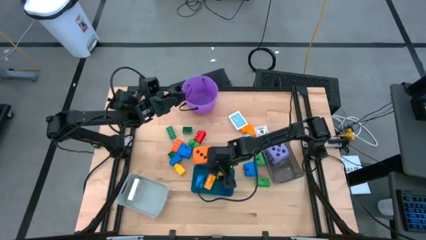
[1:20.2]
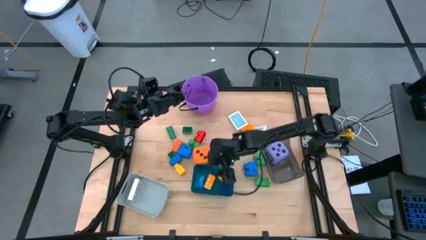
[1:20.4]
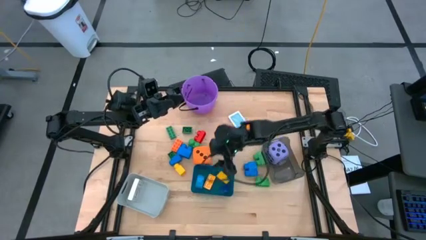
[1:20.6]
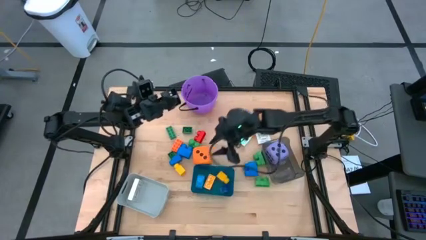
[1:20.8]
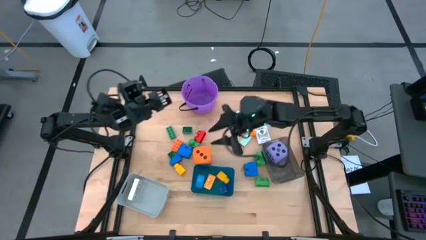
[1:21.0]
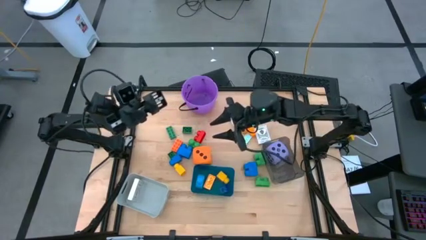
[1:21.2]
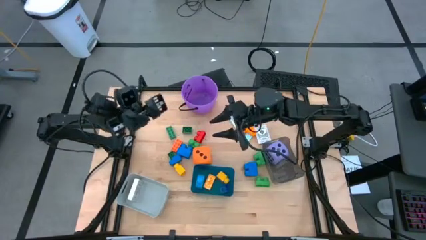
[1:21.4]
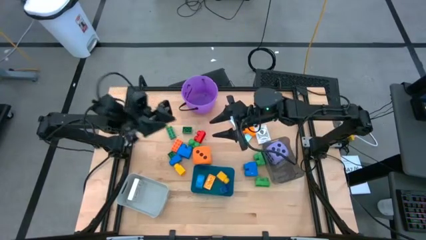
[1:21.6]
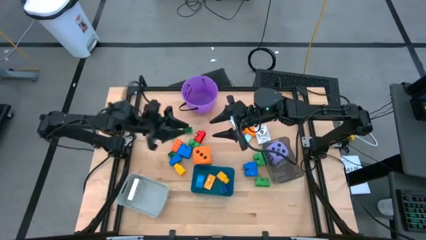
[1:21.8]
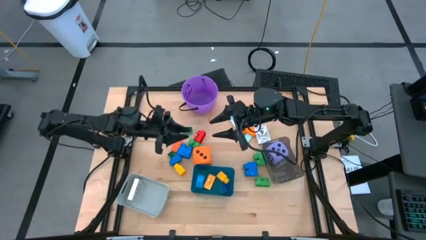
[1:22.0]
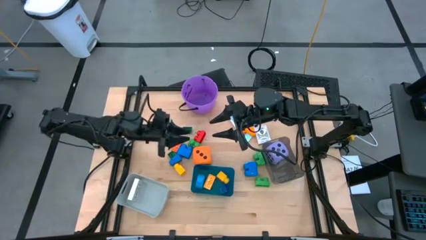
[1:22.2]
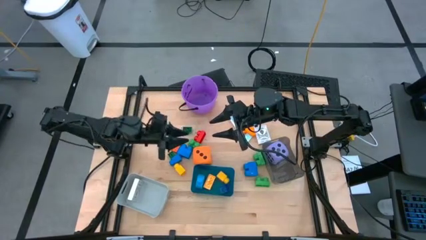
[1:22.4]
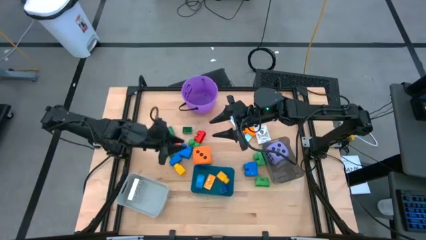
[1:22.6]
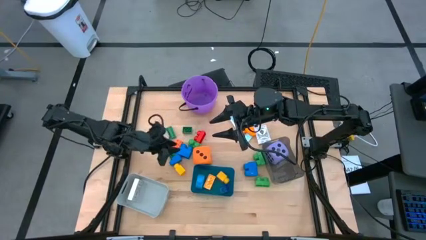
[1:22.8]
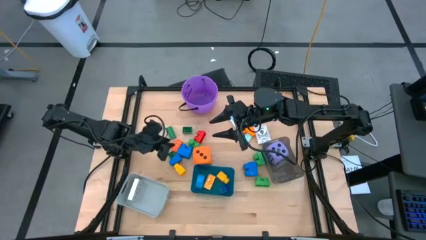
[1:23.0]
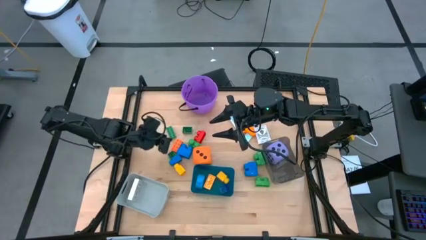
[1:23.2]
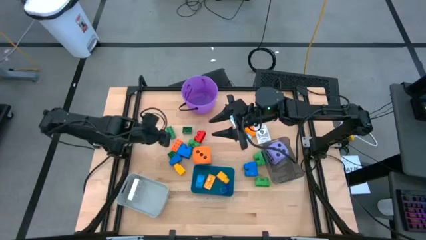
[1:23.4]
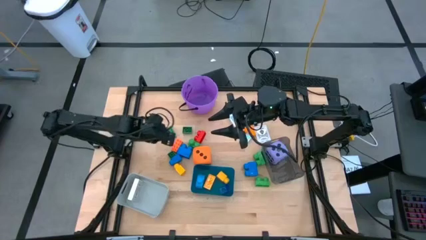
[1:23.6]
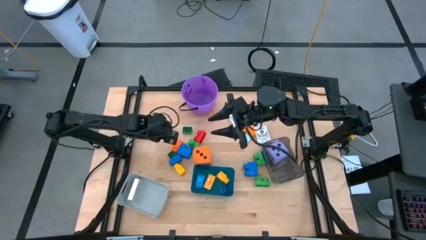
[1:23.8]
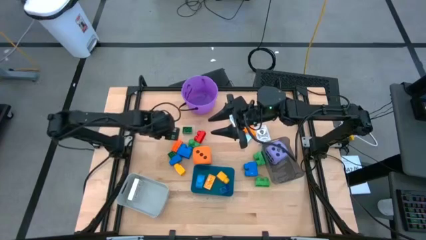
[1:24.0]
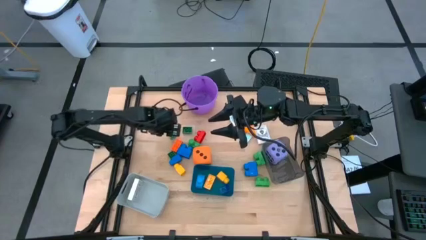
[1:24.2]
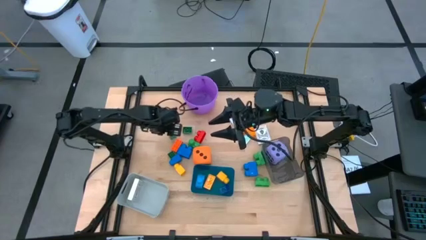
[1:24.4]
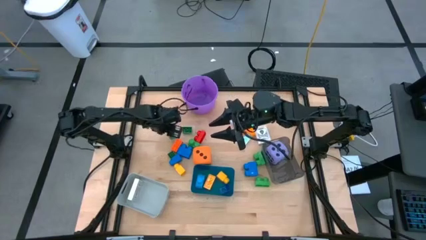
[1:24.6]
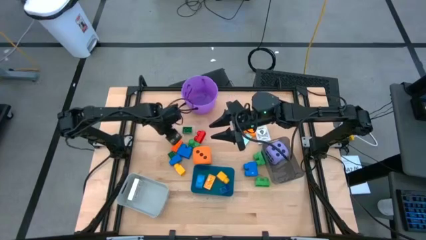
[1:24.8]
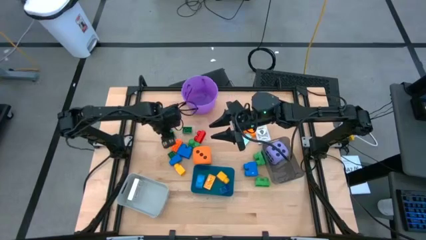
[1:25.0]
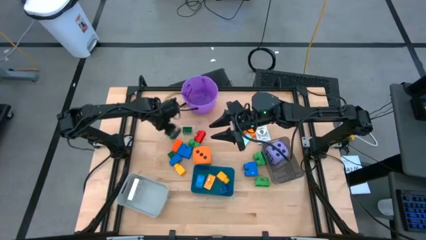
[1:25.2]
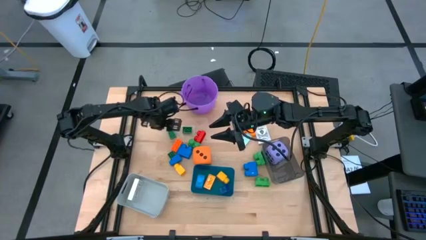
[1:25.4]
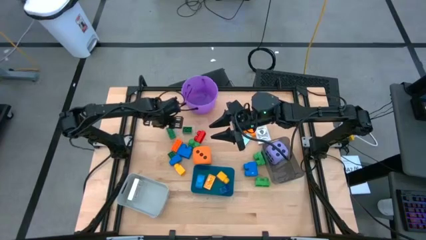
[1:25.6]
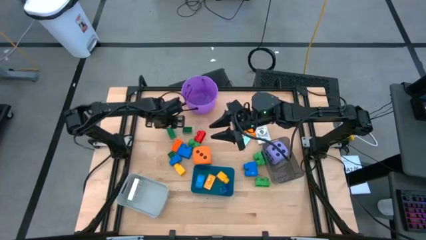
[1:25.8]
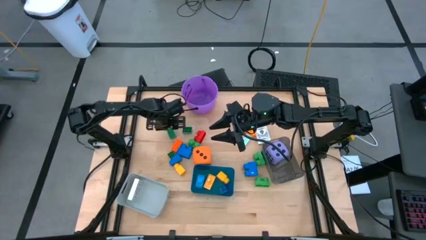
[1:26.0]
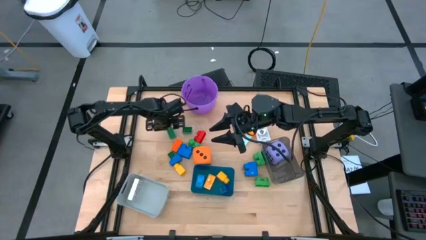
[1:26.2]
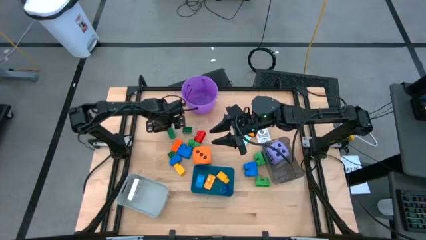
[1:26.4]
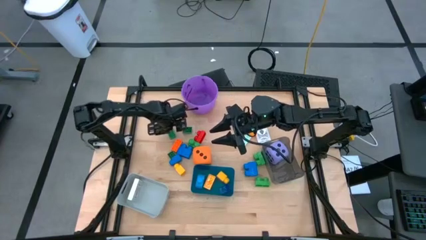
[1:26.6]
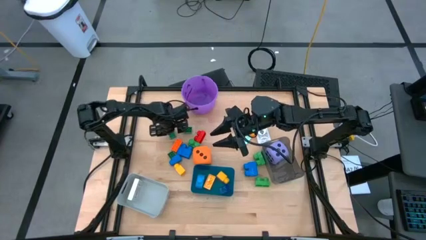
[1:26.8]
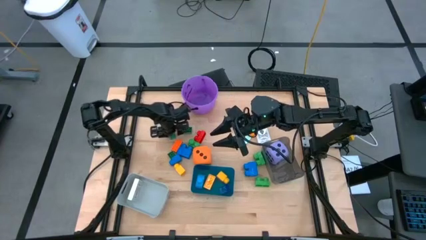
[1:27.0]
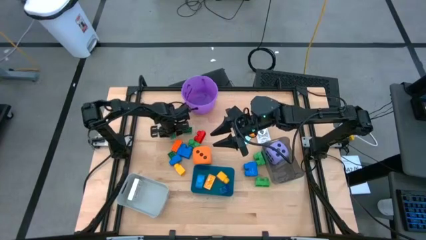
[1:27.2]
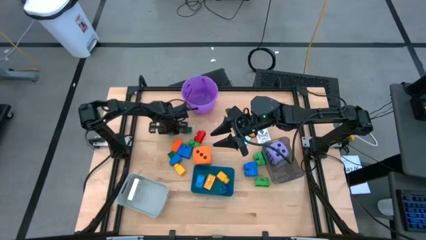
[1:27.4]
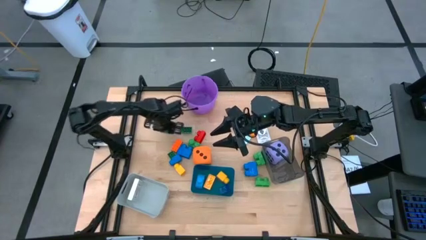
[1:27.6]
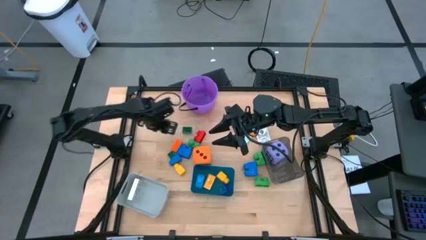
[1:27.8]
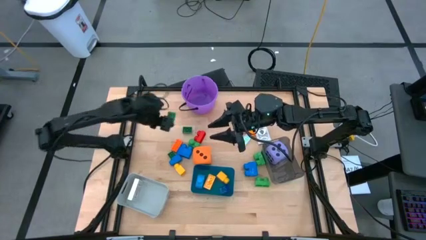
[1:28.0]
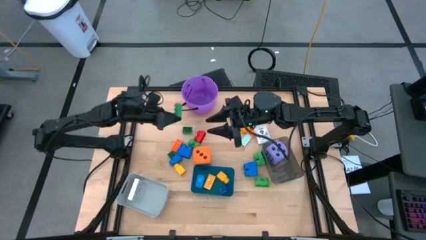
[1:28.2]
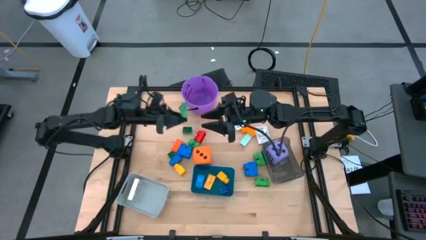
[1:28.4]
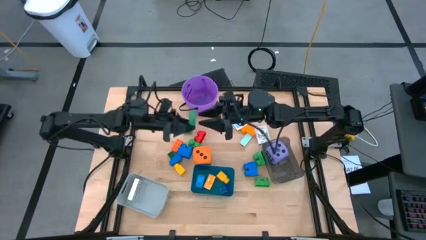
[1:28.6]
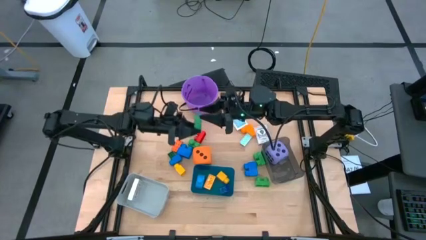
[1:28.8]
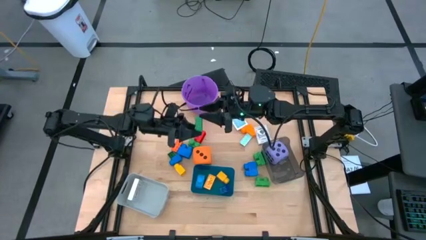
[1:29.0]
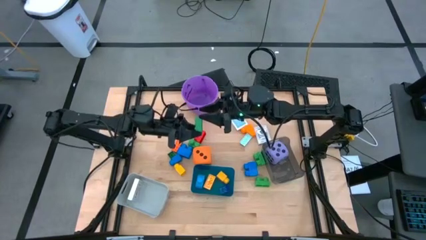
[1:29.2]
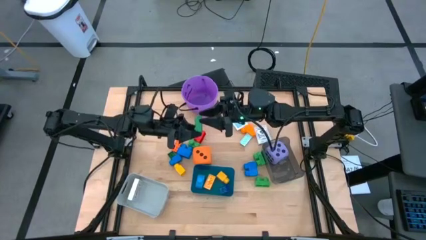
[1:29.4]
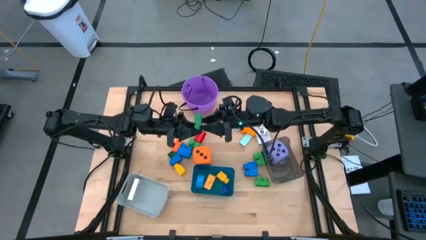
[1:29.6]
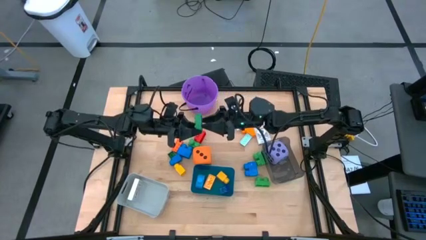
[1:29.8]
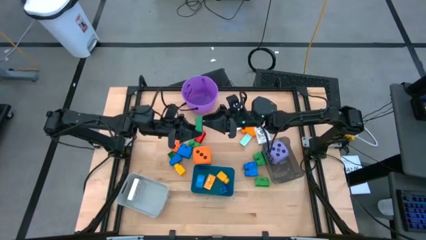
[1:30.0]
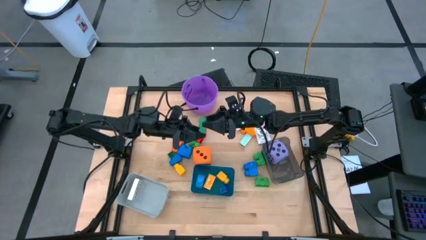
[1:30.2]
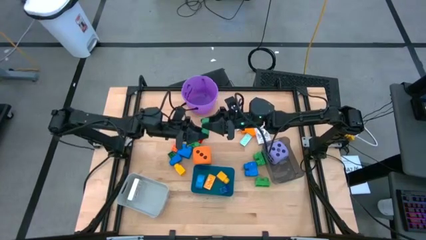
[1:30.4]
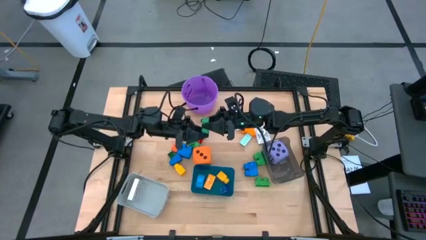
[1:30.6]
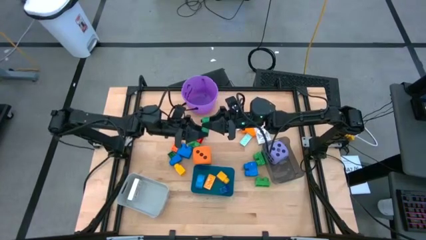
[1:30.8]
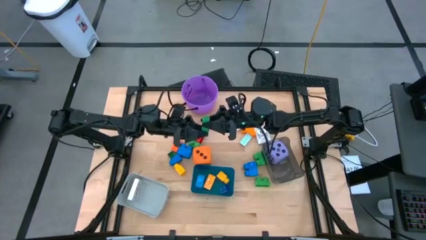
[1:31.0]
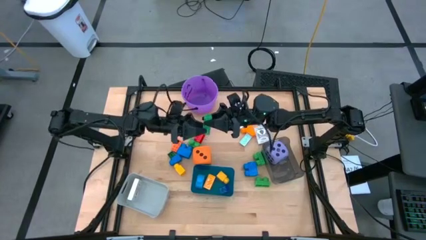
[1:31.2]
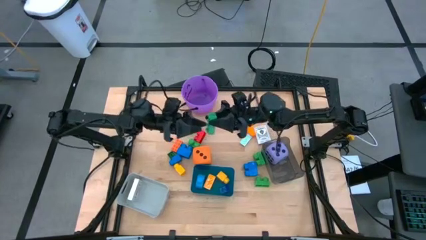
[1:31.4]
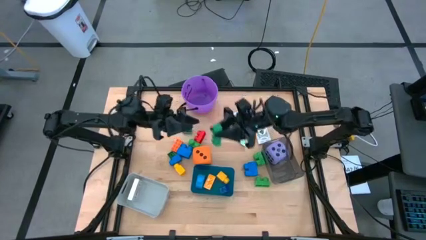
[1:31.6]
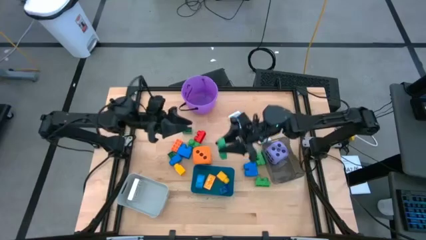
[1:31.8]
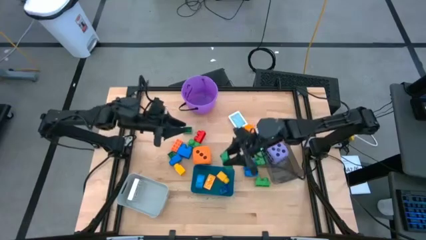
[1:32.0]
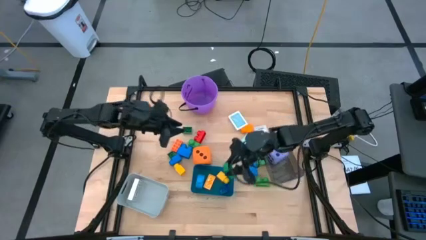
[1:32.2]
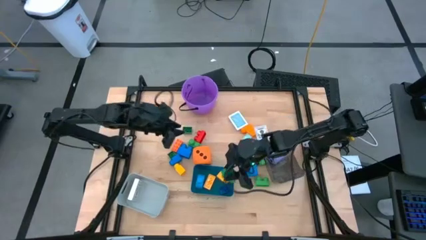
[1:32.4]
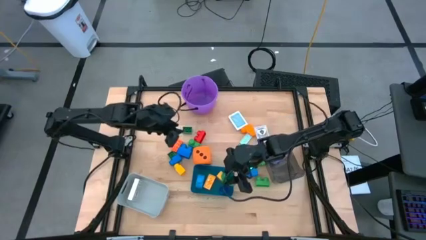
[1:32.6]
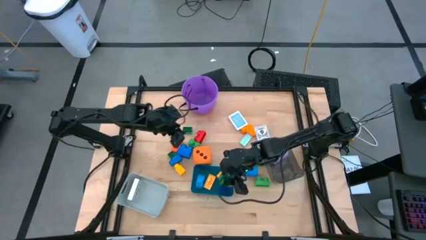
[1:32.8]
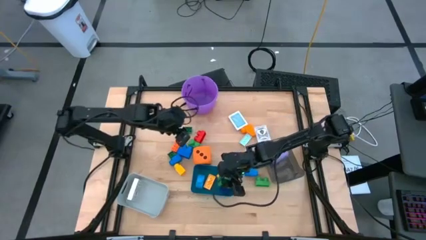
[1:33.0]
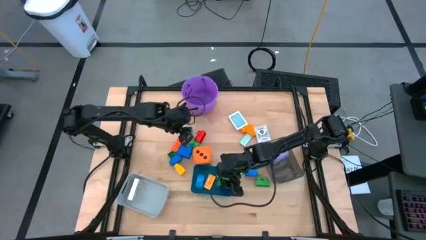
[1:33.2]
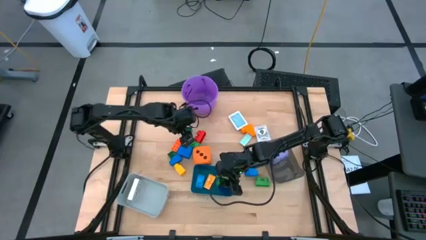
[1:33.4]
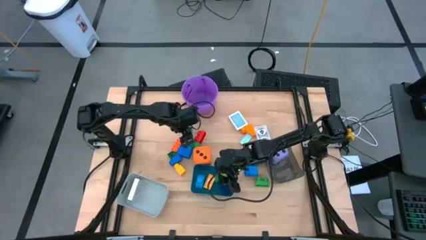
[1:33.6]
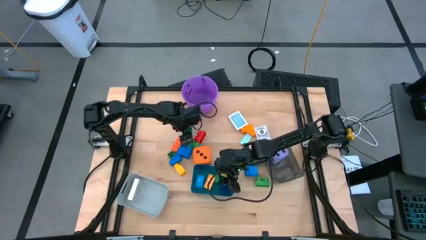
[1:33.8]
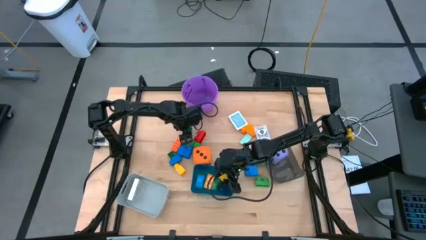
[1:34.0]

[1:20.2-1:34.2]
Task: Pick & Place Toys
Put the green game piece into the blue bin

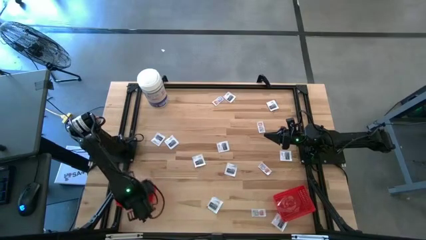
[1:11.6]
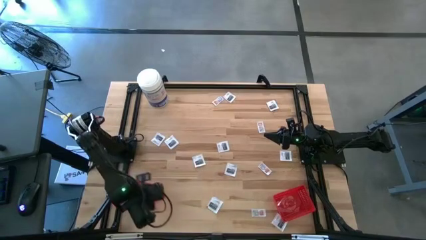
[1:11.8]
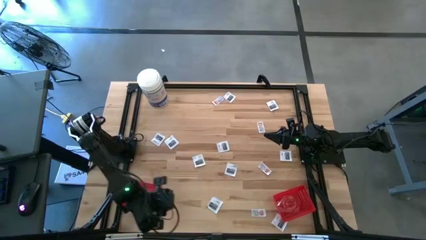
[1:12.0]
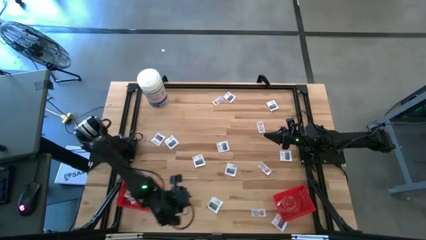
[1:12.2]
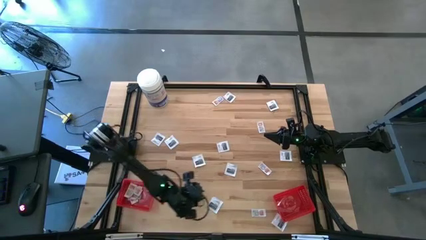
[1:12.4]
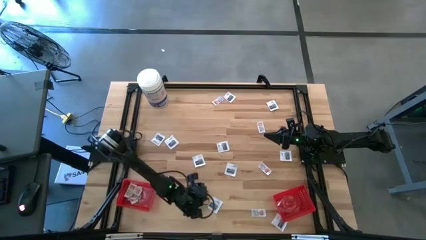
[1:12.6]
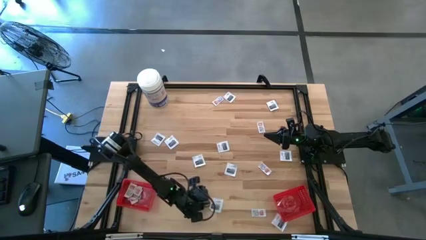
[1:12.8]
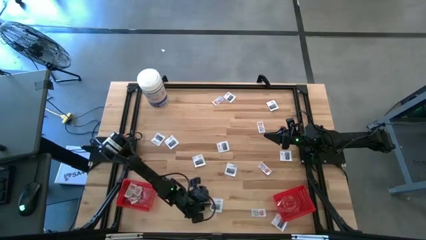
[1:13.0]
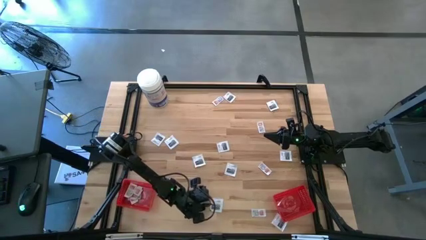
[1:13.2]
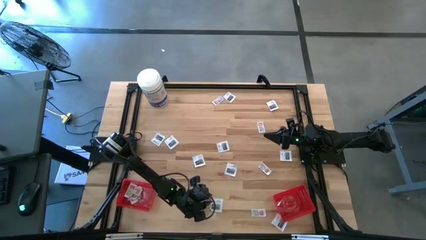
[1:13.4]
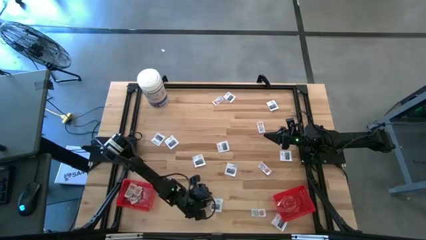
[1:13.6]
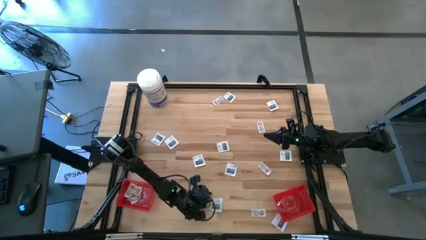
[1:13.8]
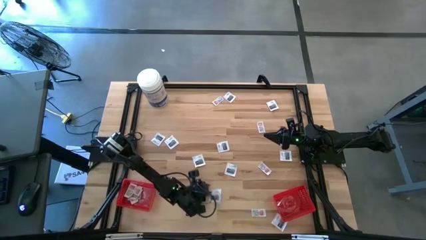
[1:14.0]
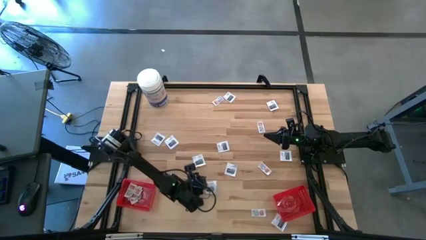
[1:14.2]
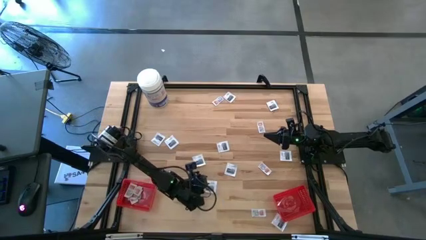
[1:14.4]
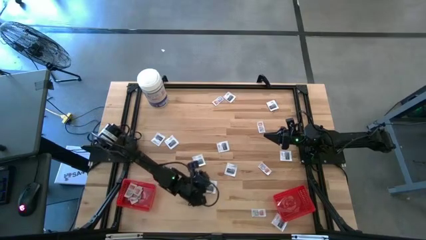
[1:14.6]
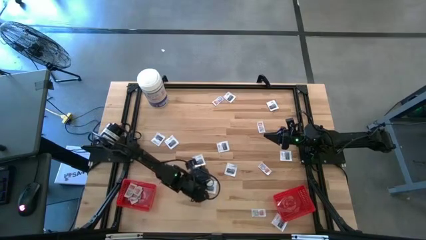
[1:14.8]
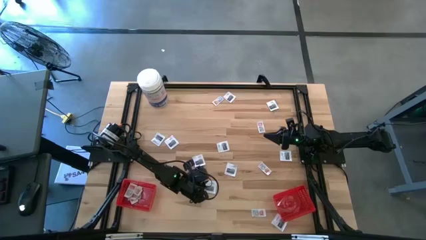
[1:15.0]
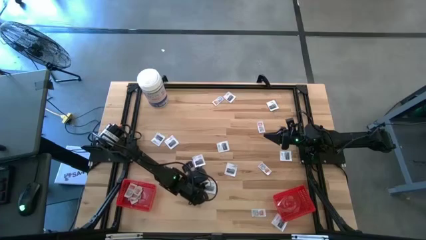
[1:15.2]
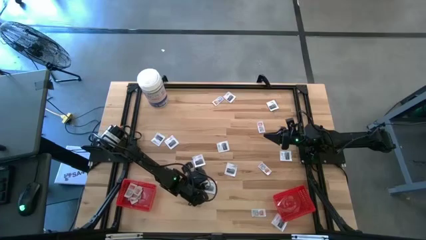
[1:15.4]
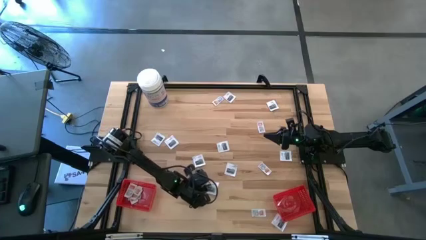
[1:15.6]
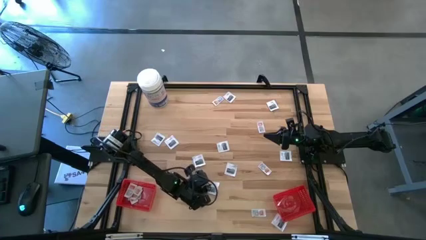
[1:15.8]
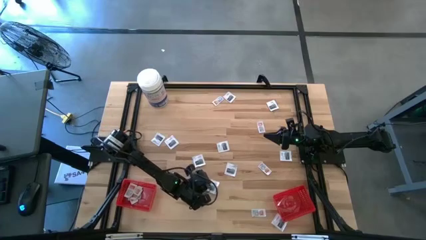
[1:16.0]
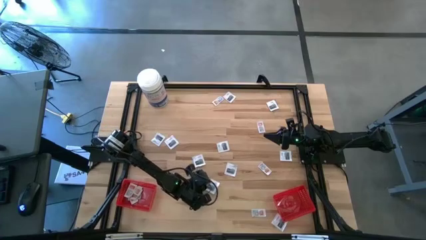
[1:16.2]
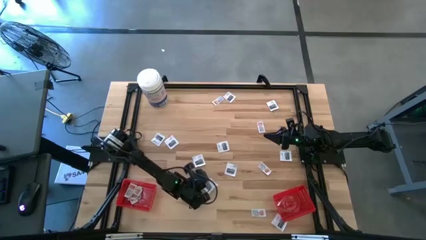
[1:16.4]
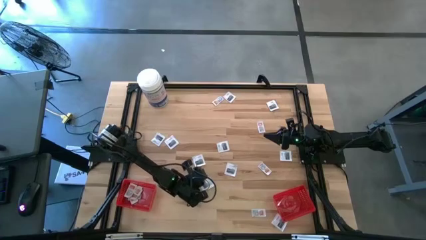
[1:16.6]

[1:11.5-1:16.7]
Task: Pick & Place First Aid Supplies
Put the towelette pack into the right red bin
